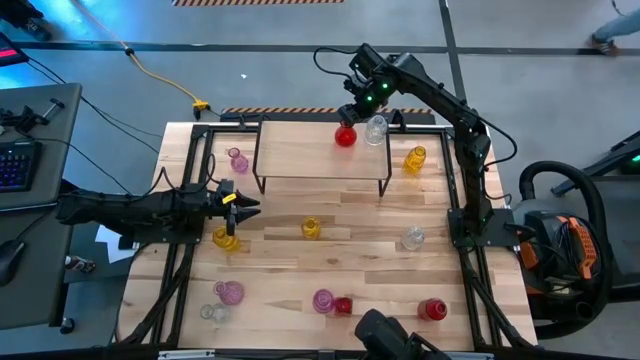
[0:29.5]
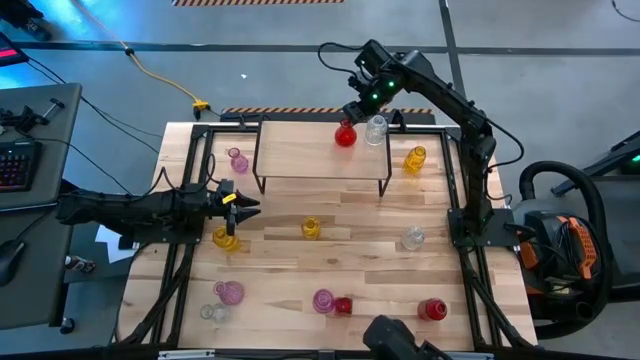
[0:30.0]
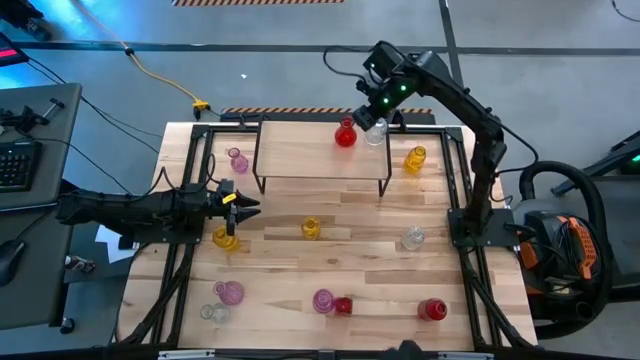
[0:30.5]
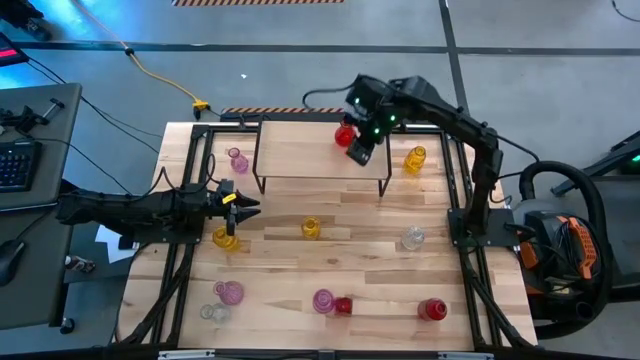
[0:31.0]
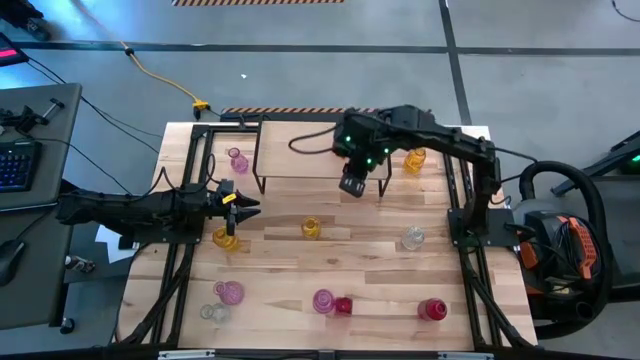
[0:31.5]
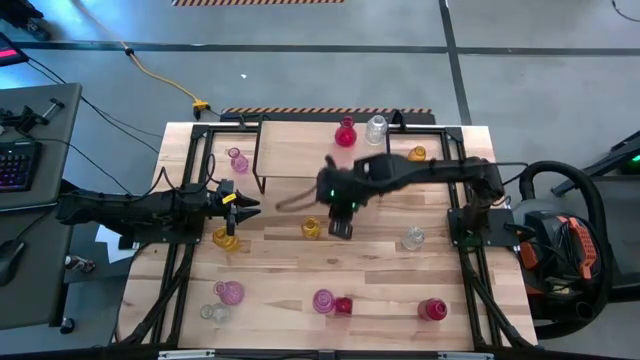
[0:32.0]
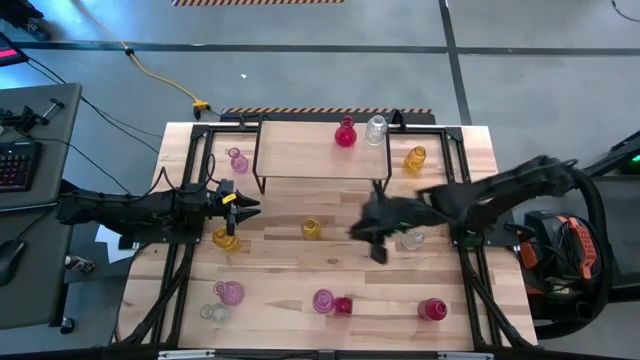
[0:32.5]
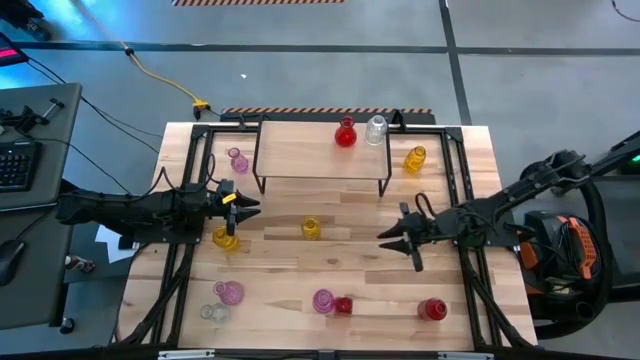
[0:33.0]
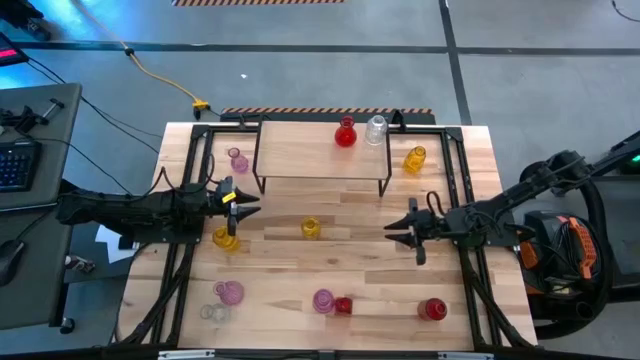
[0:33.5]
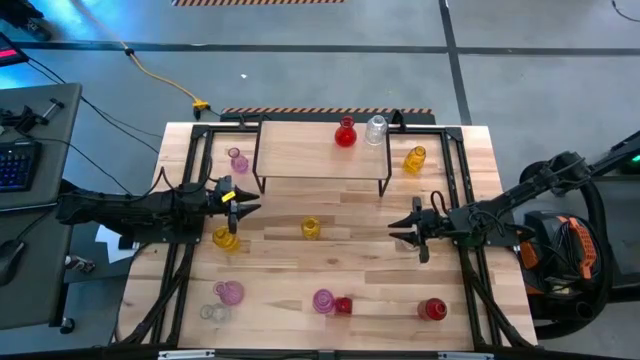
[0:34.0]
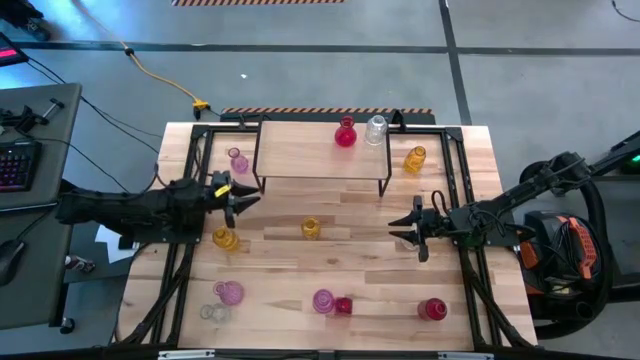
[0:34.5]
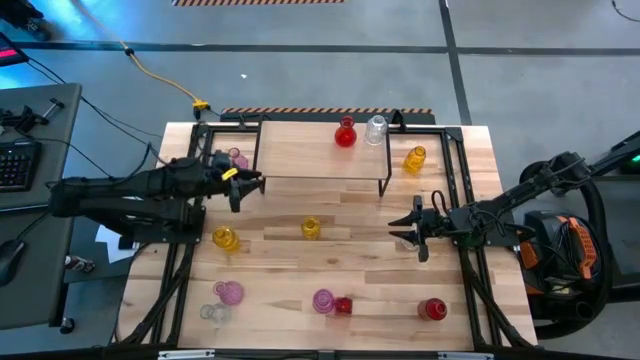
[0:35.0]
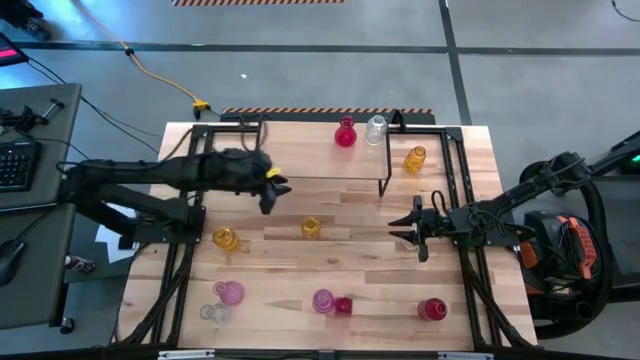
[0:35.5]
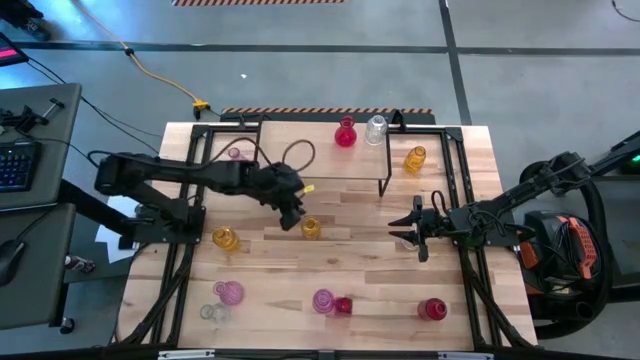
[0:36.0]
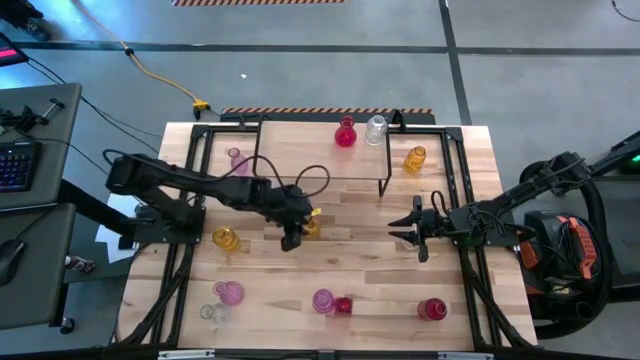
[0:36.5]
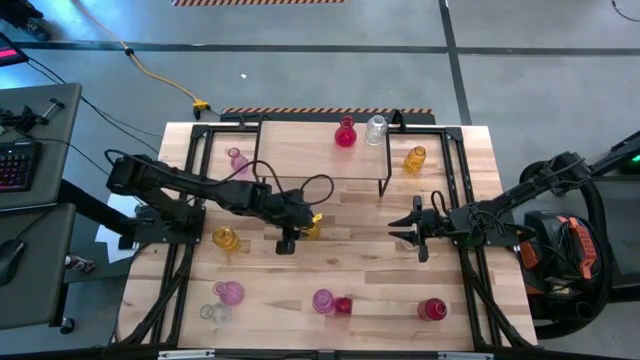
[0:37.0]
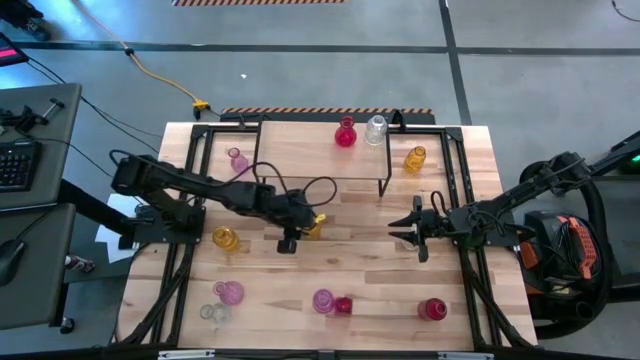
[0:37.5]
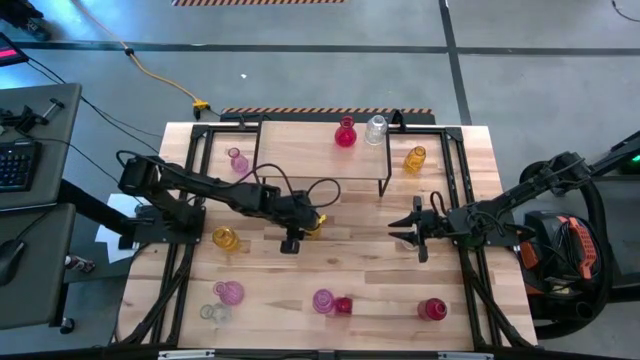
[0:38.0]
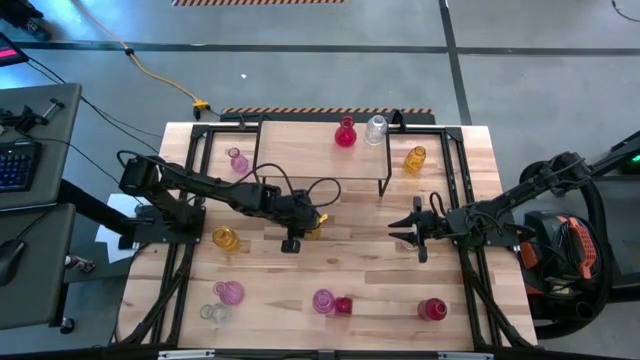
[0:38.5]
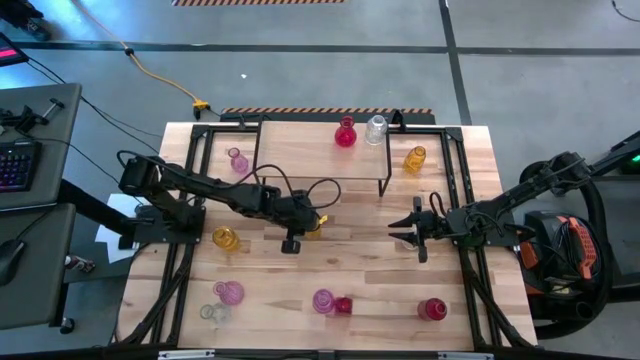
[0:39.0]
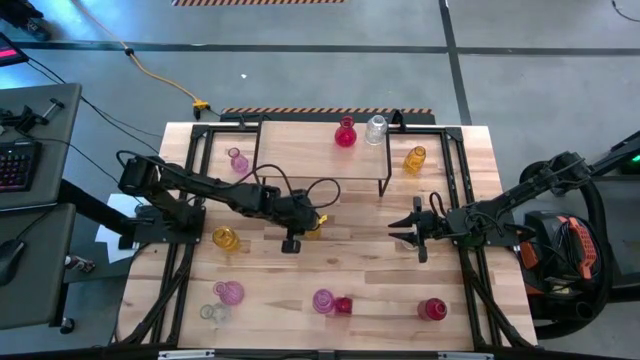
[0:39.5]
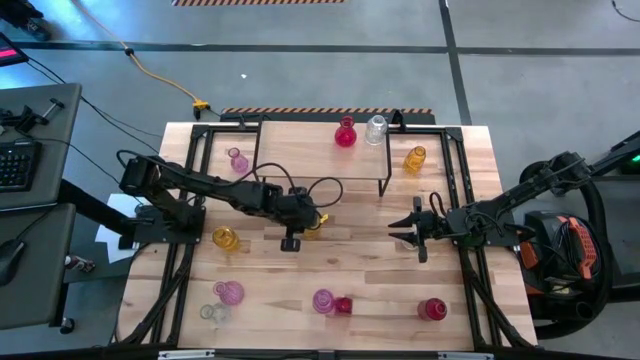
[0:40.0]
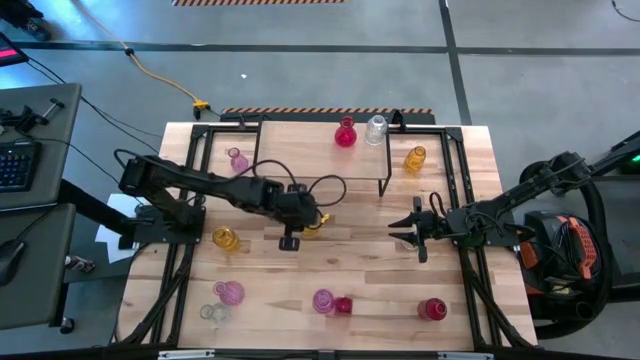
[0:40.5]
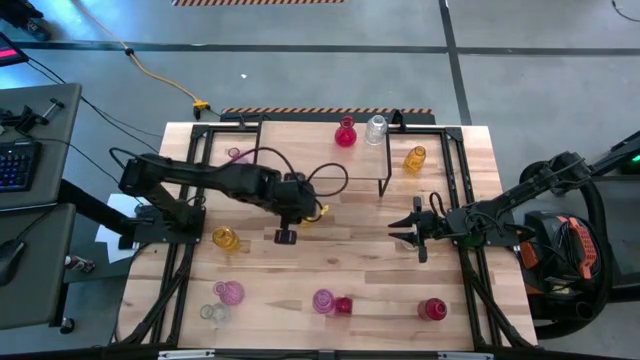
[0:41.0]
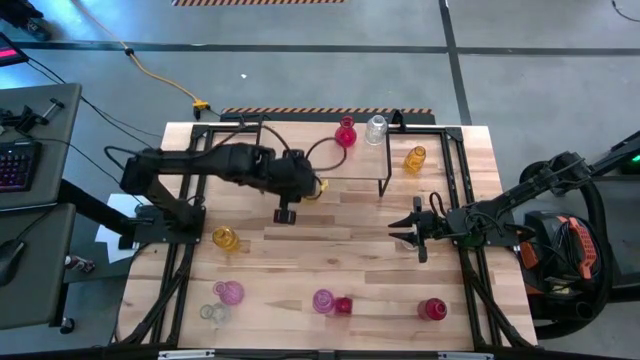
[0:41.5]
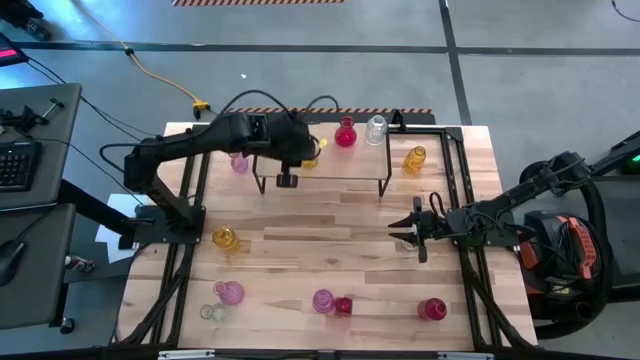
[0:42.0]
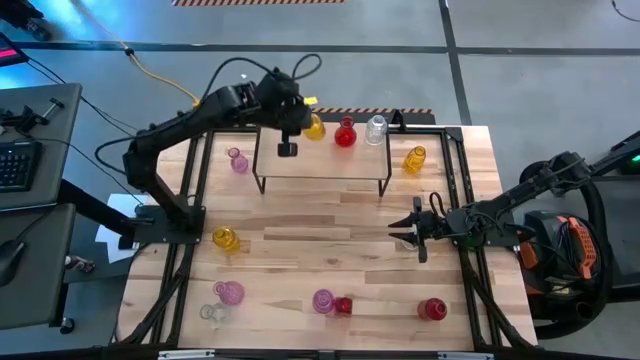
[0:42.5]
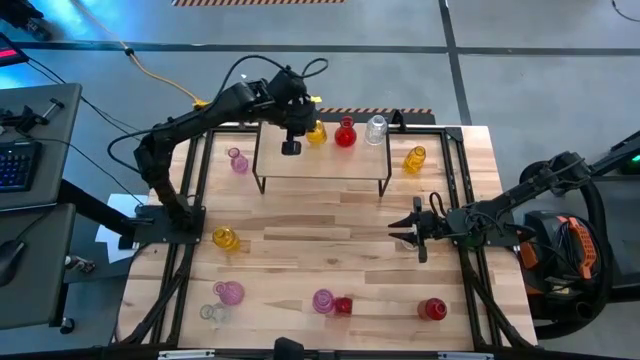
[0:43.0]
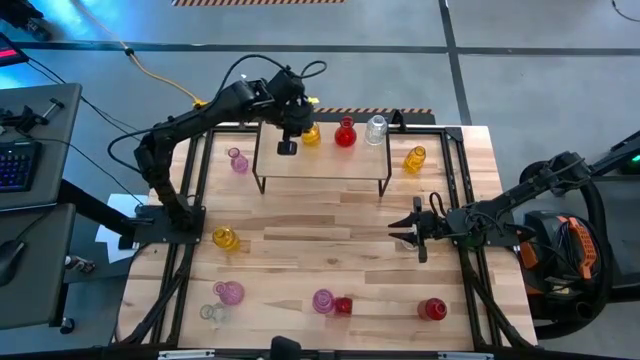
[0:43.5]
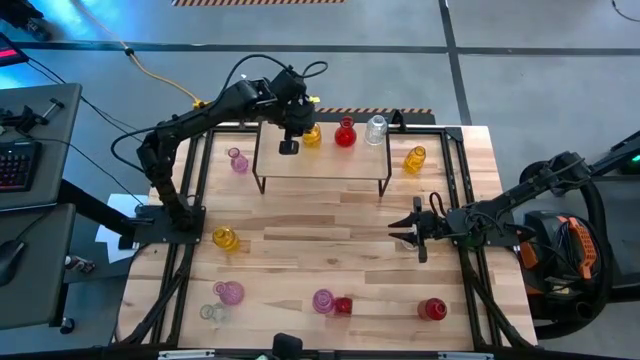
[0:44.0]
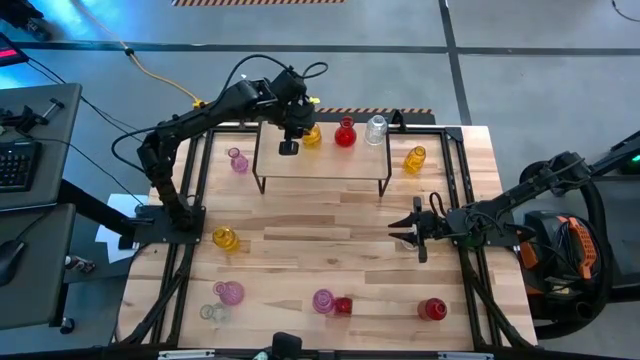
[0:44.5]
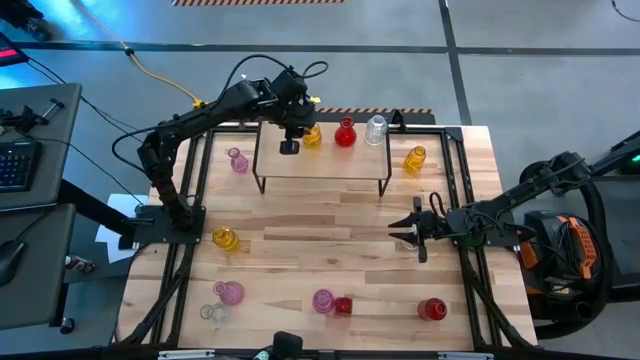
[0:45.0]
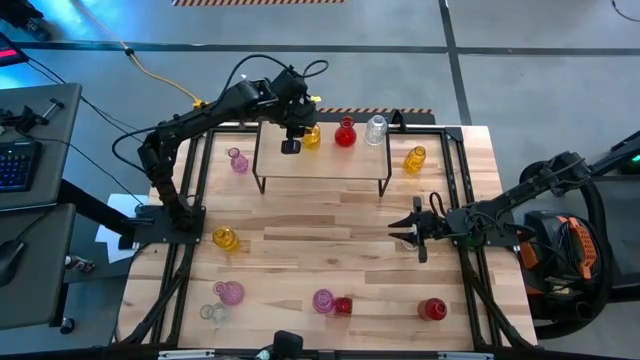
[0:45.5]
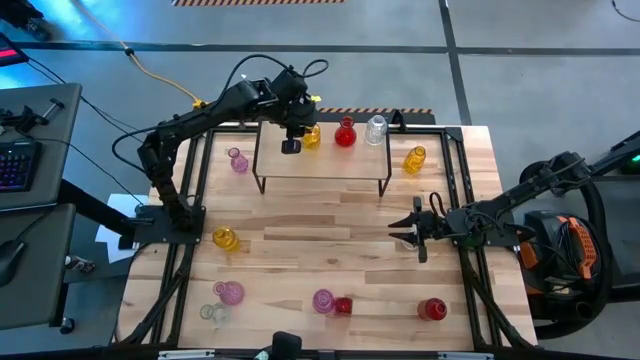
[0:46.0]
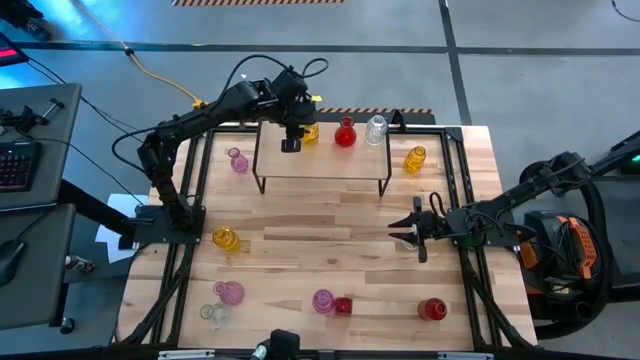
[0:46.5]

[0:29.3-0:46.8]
Task: sort vases onto shelf
Put the bottom right yellow vase on the shelf

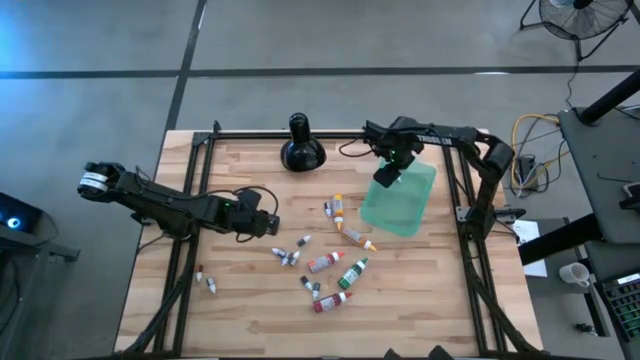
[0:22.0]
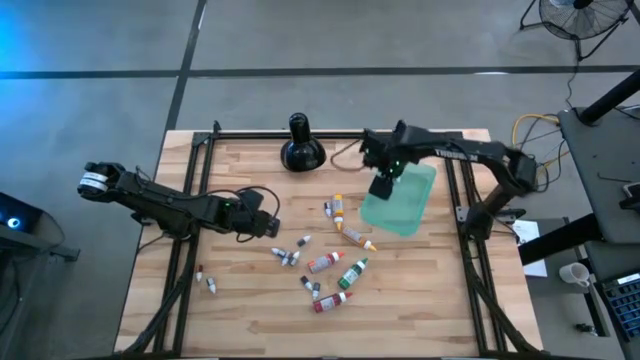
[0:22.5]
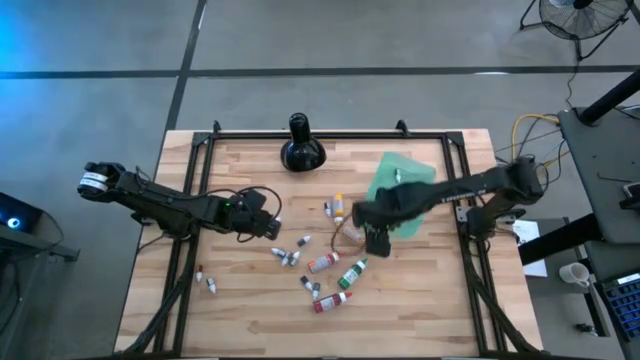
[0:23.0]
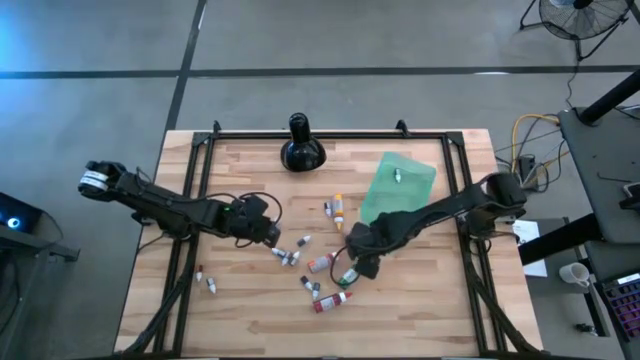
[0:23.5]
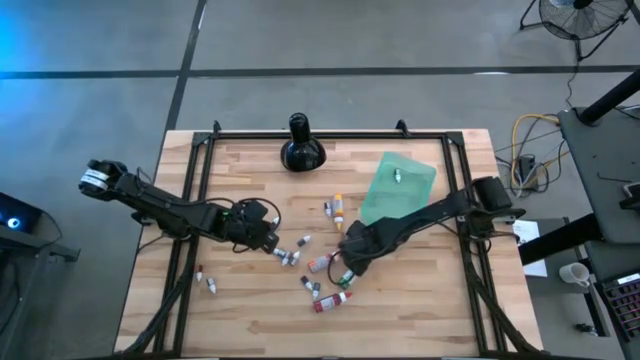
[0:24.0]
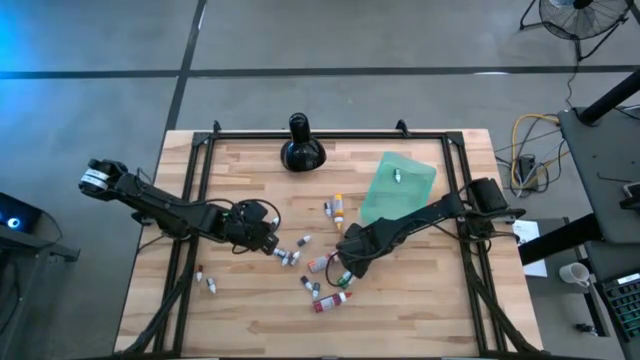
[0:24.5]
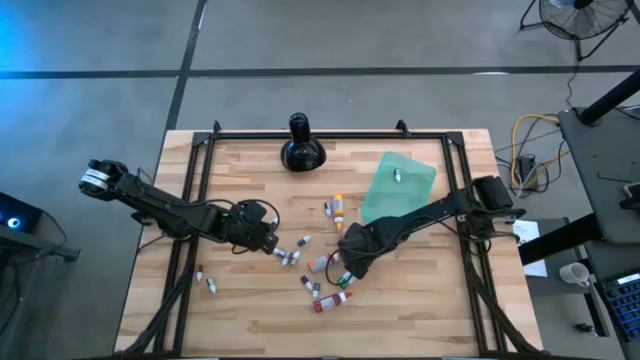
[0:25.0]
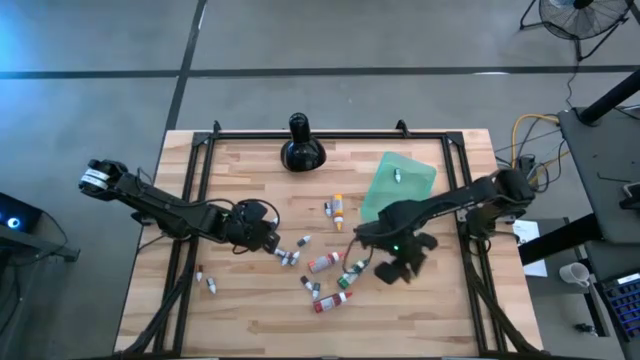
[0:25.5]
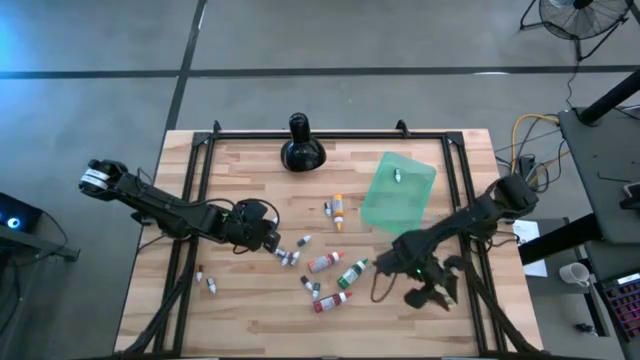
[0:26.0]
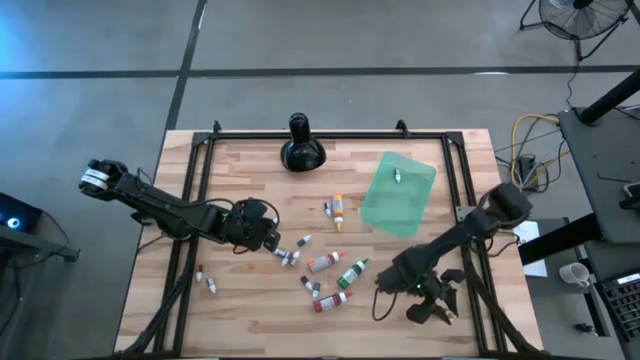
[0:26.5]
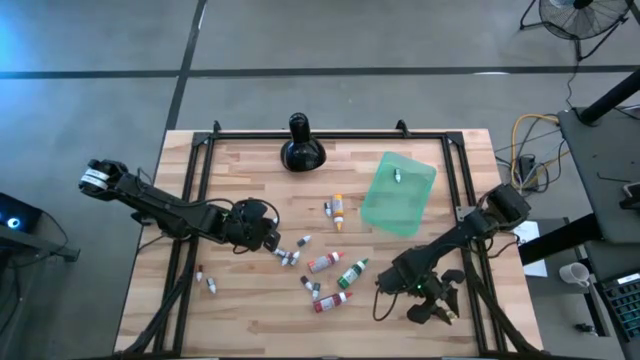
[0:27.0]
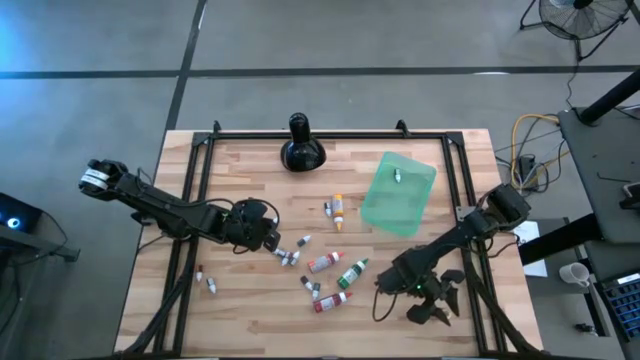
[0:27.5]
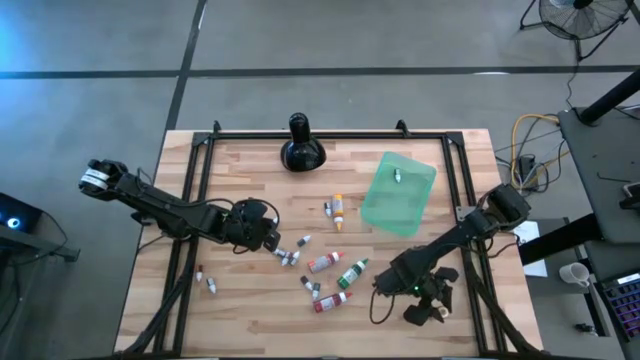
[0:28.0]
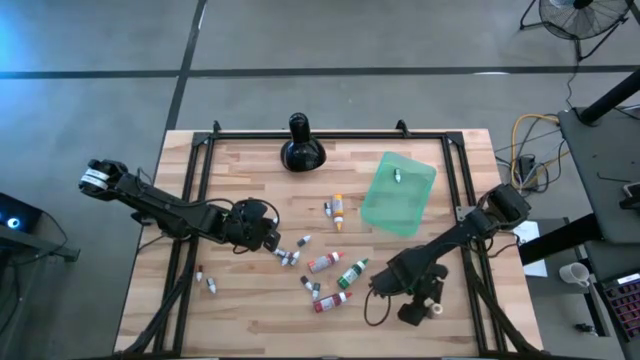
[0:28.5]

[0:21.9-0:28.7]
Task: Pick & Place food coloring
Adjust the bottom large yellow food coloring bottle in the table
